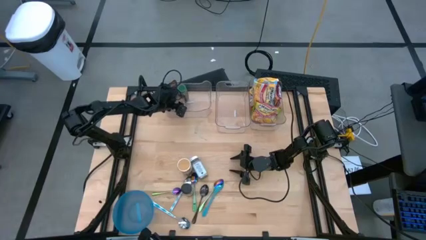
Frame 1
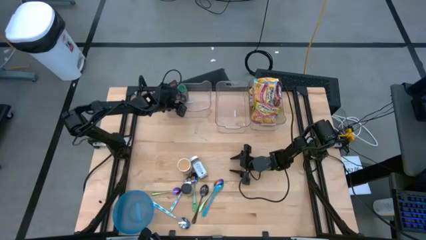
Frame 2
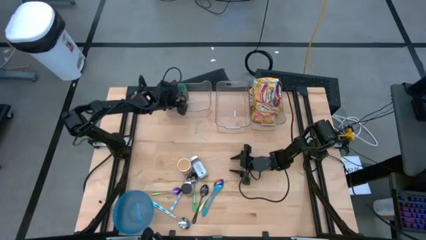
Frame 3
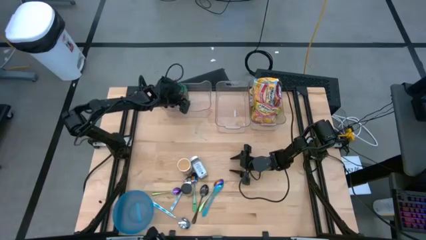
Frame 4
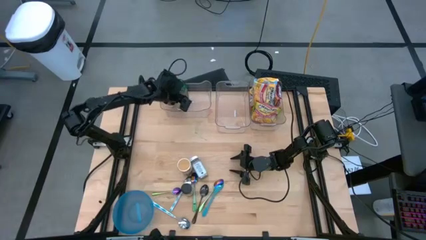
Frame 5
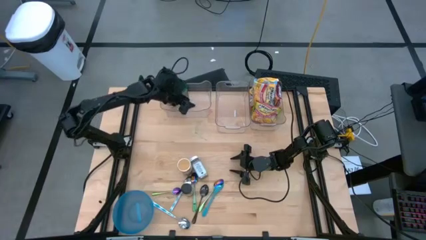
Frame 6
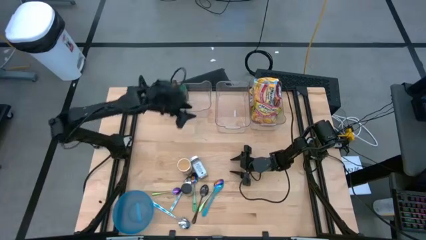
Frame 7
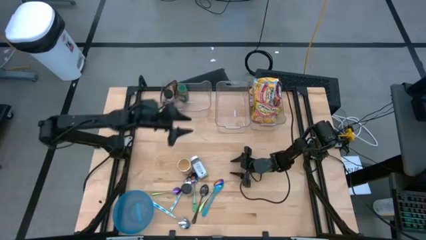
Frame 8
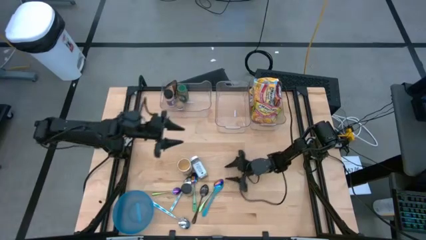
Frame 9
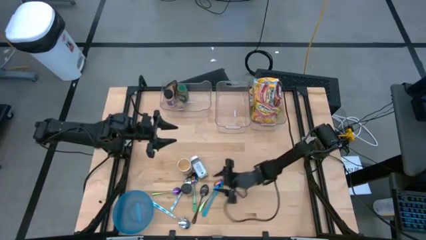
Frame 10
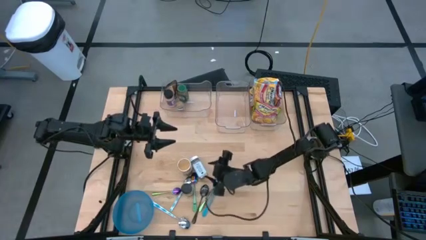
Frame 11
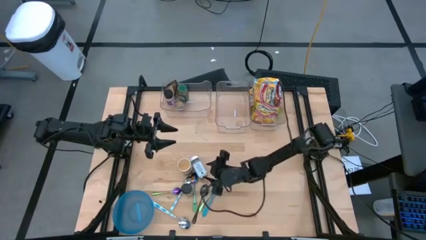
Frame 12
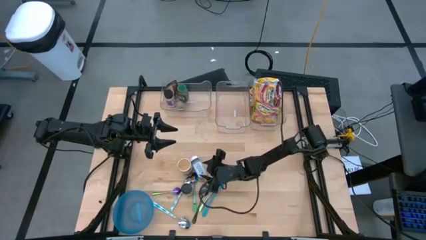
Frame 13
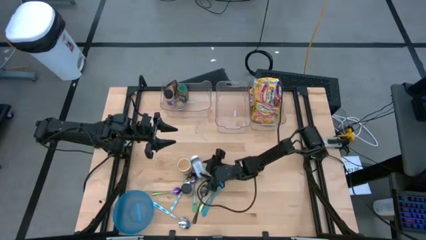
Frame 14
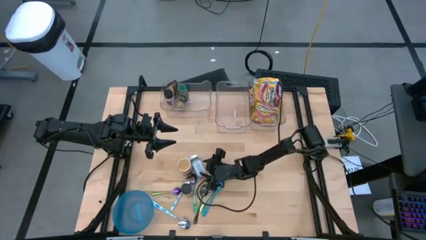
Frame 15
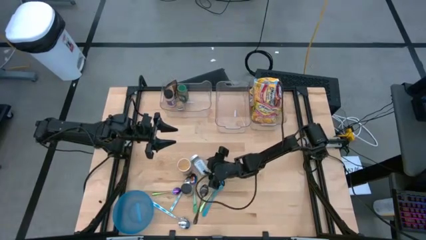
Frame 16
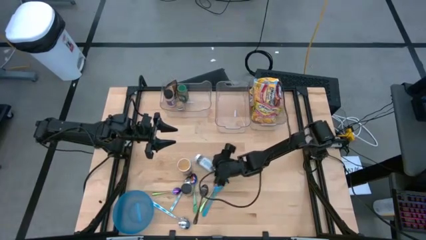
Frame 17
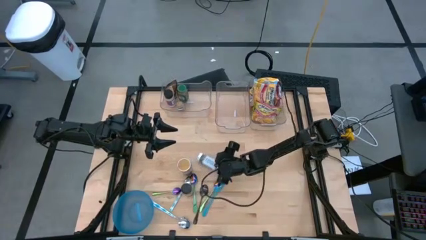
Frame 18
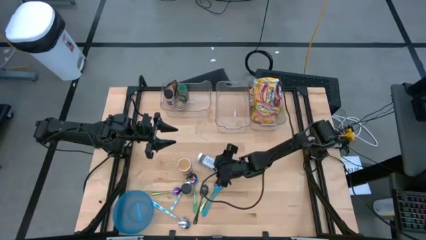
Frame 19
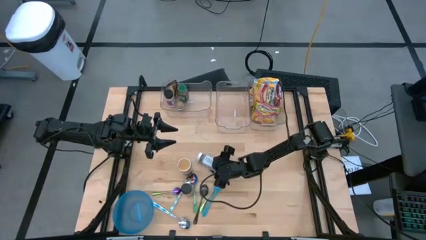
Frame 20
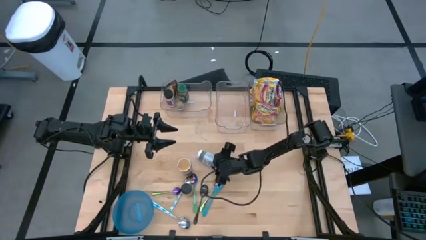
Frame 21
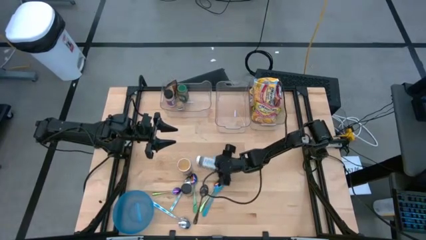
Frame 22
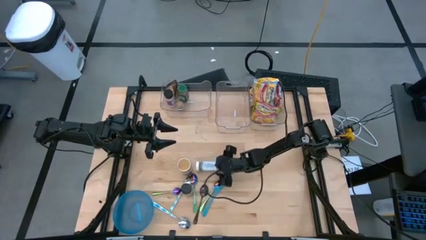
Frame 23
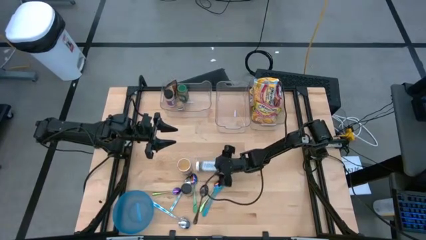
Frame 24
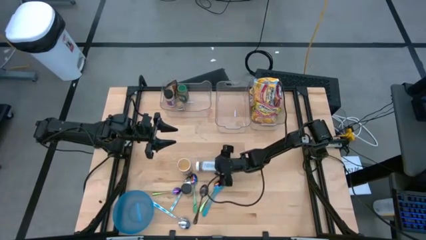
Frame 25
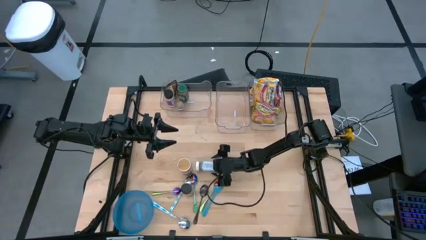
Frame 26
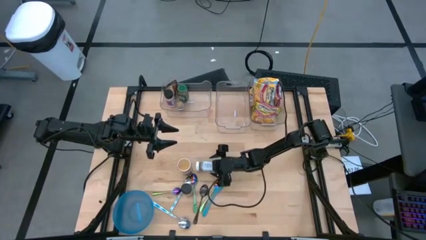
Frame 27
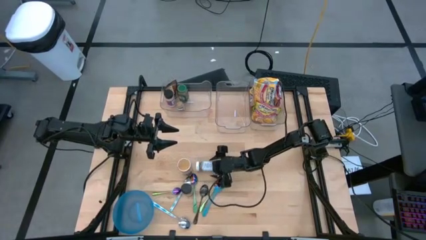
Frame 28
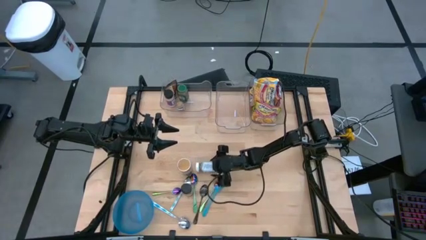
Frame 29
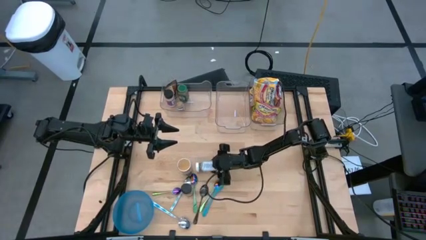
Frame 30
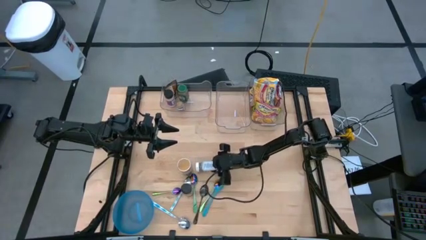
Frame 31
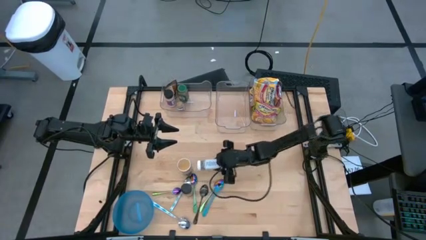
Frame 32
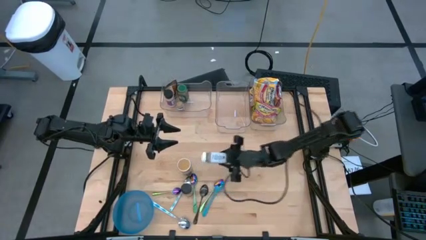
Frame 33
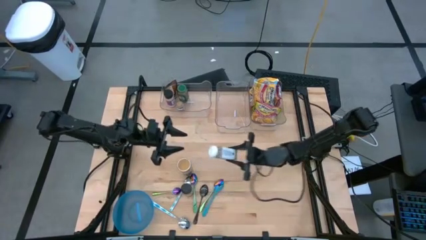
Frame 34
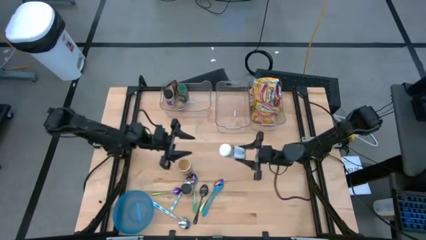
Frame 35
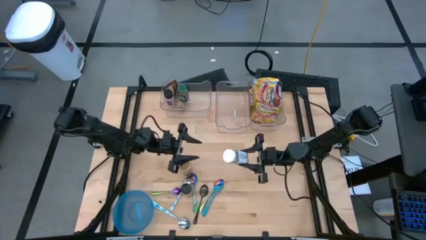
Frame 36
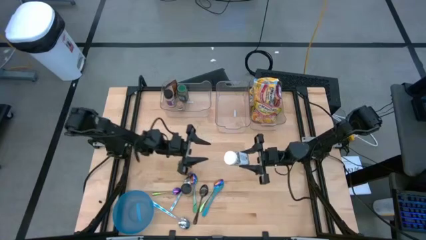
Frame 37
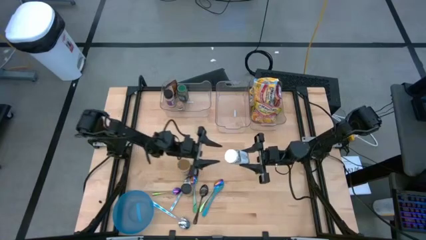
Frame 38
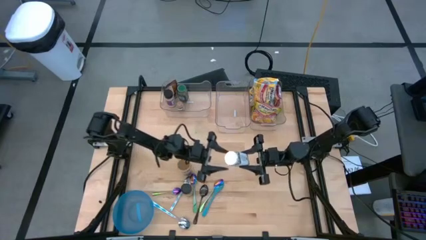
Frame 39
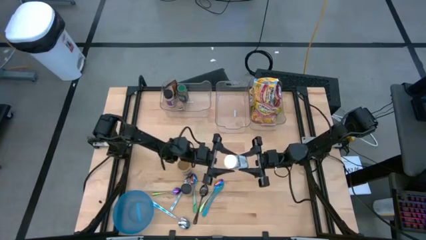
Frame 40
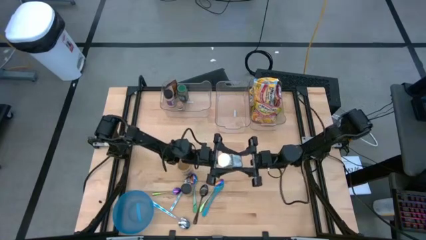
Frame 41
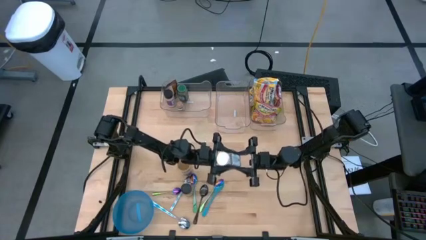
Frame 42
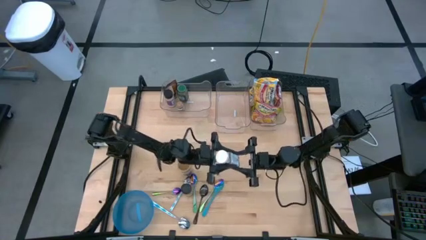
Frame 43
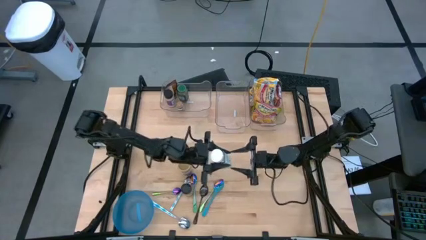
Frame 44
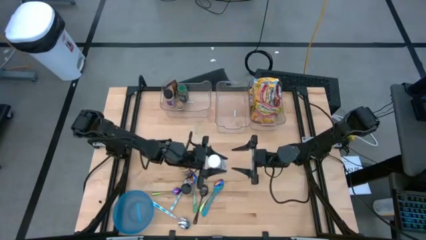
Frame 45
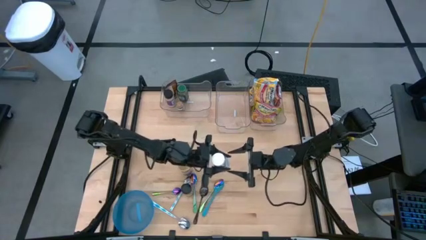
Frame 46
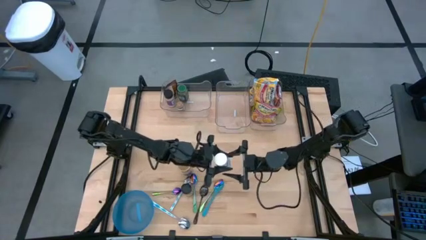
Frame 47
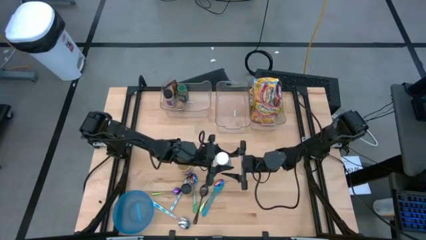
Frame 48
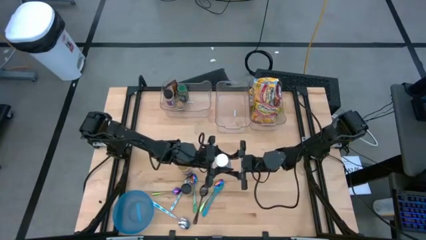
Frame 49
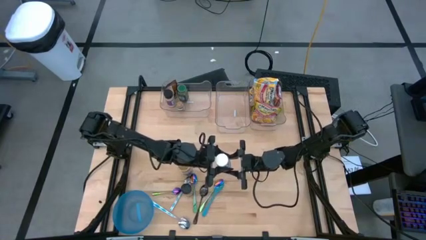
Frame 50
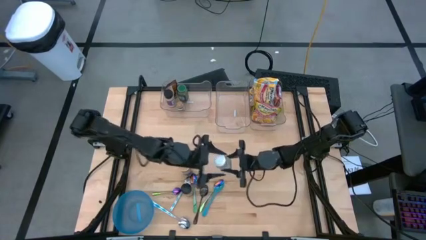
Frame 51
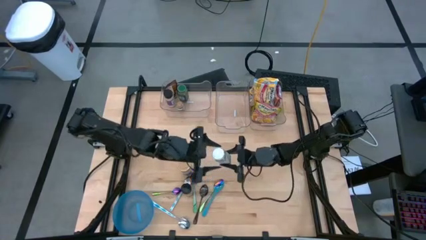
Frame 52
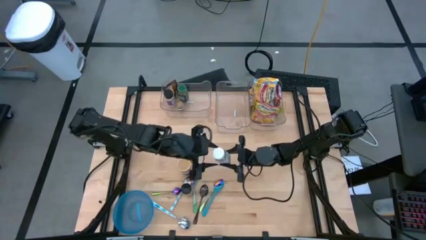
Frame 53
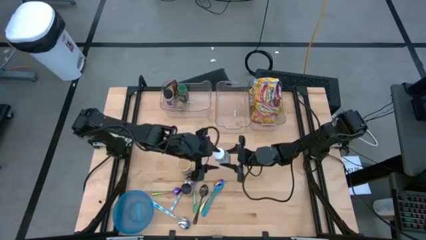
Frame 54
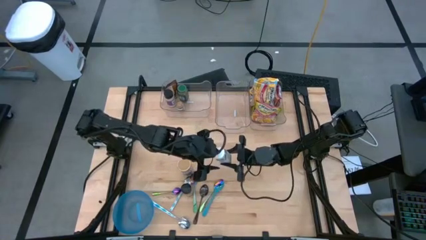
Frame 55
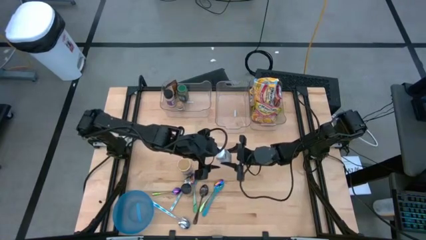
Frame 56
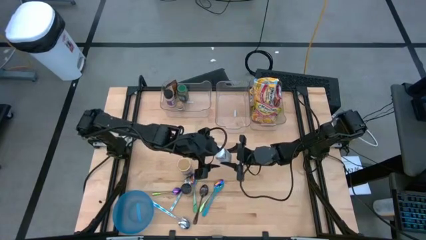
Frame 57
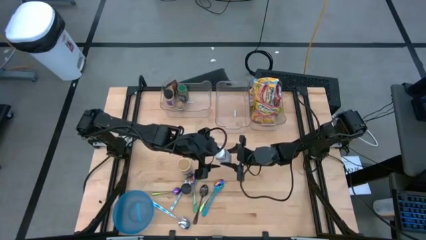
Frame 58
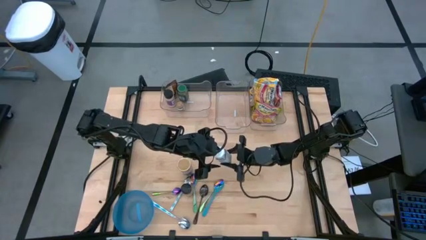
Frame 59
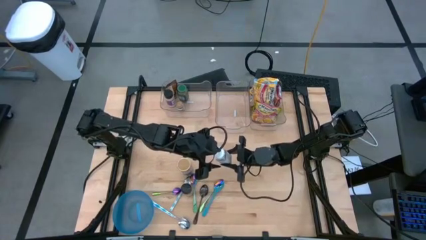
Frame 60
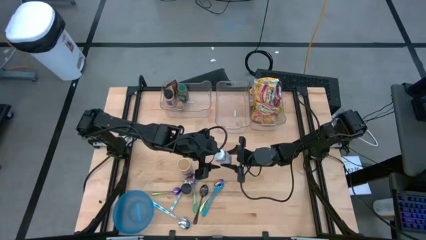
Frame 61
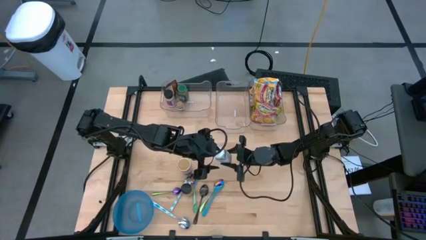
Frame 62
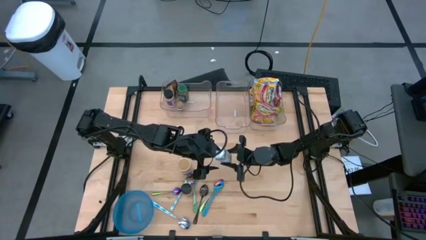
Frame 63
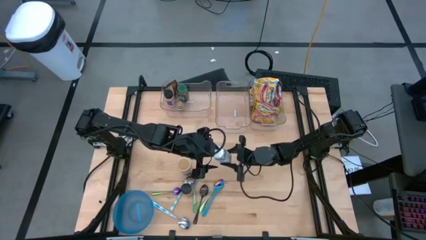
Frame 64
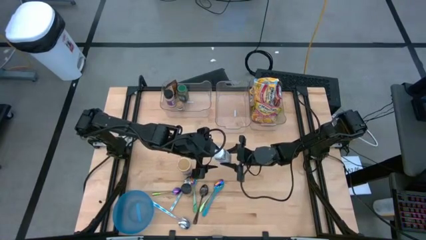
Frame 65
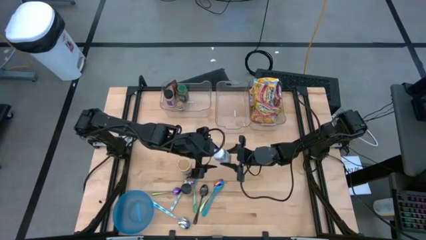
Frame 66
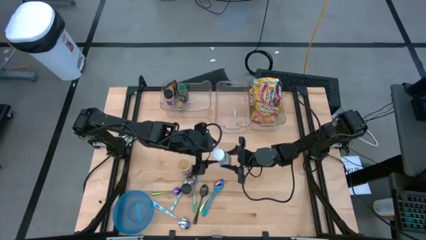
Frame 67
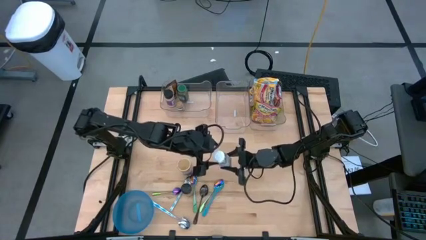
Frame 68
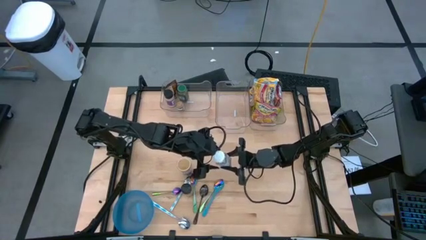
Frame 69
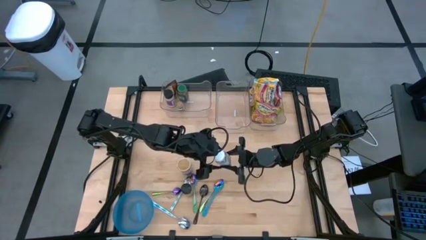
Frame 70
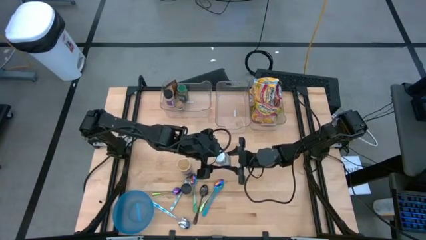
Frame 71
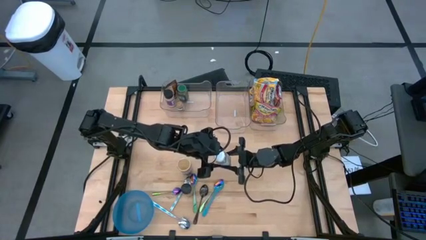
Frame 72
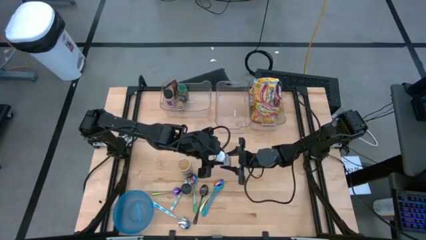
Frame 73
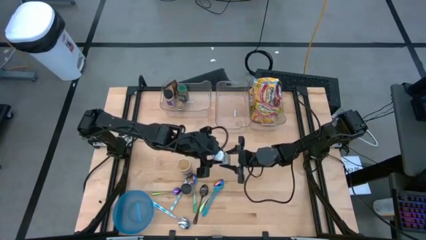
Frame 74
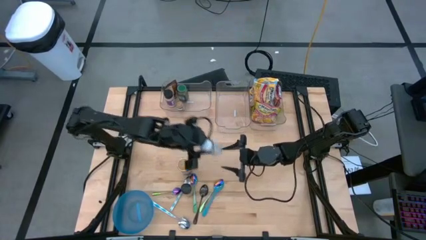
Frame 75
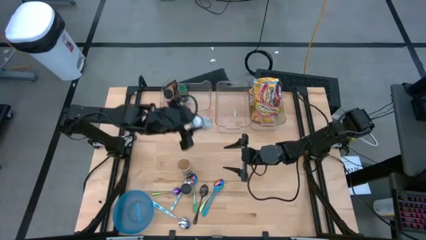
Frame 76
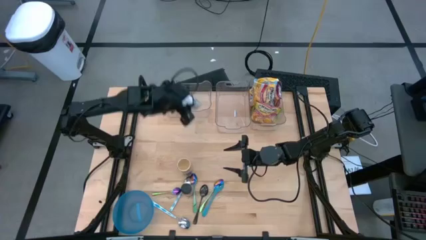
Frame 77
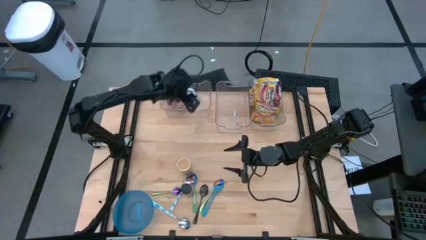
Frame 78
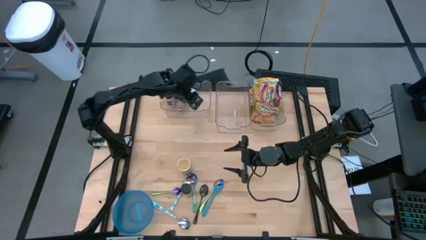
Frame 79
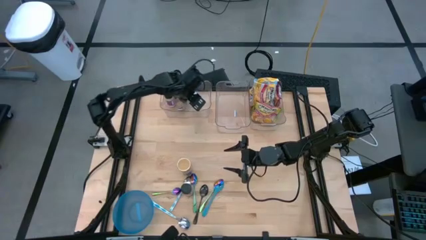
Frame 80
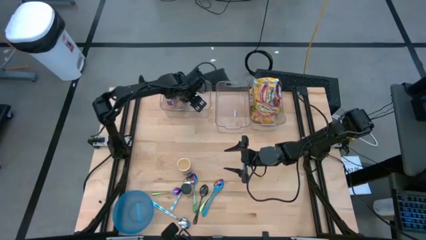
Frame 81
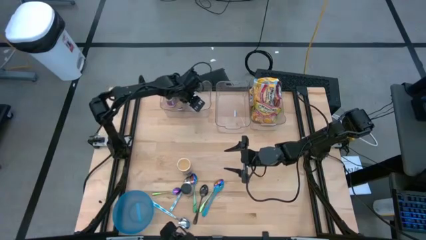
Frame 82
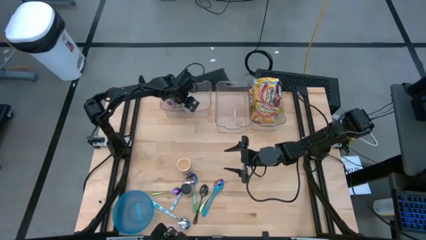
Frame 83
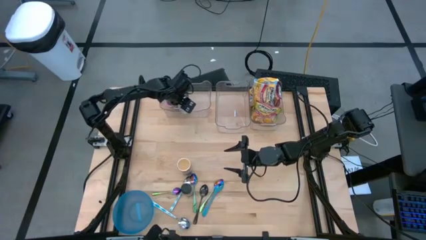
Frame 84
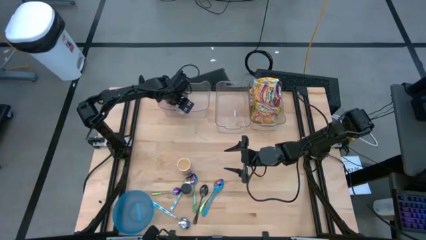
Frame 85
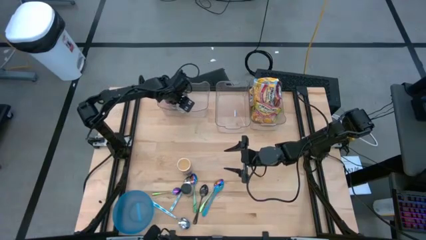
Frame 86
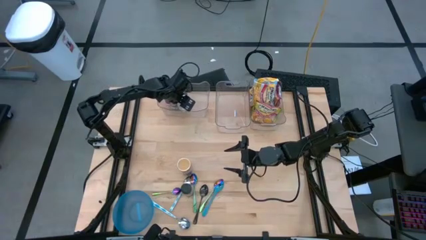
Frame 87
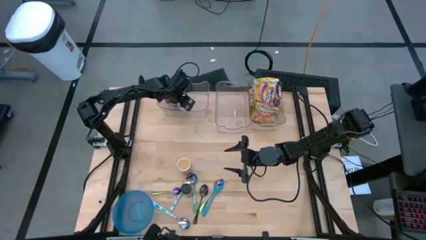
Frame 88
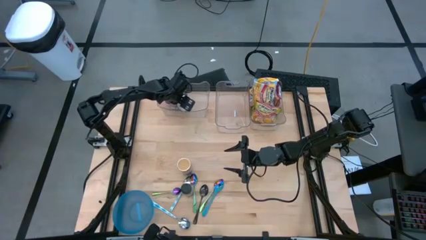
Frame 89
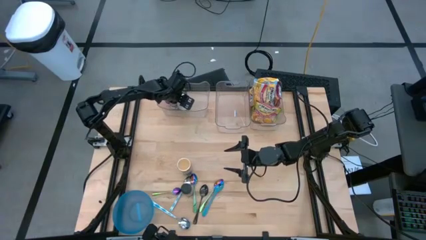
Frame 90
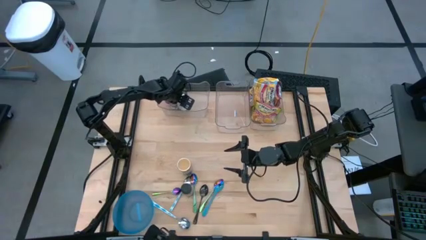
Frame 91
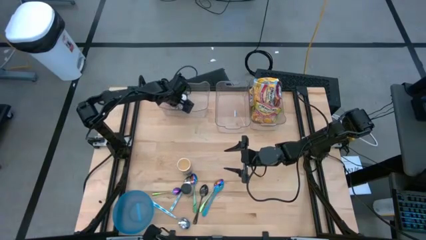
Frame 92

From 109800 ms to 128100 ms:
Task: Pick & Place Food Item
Put the white seasoning bottle into the left transparent bin
